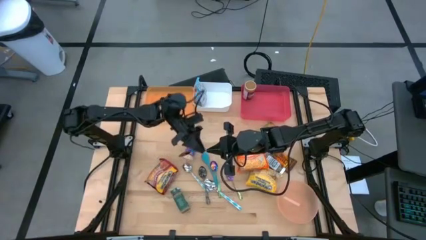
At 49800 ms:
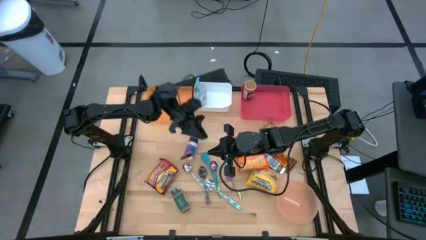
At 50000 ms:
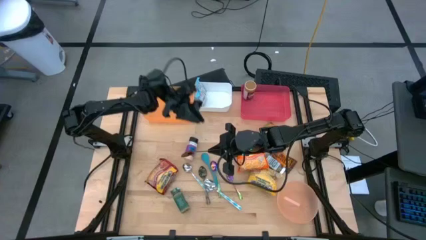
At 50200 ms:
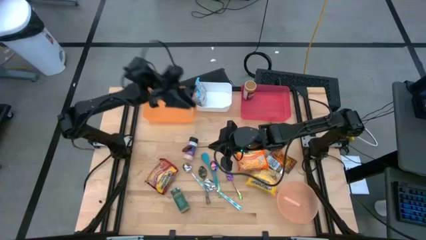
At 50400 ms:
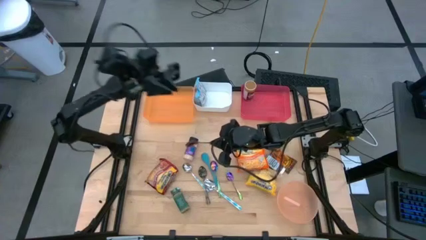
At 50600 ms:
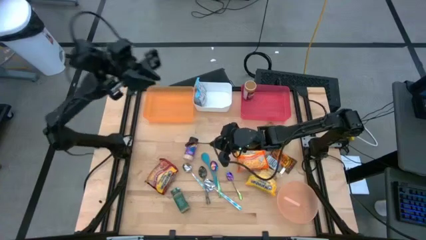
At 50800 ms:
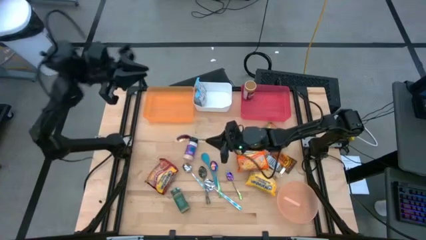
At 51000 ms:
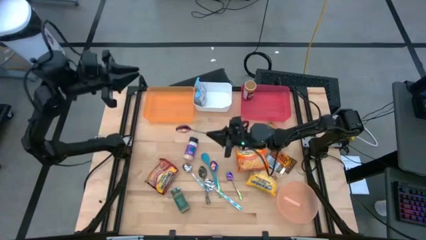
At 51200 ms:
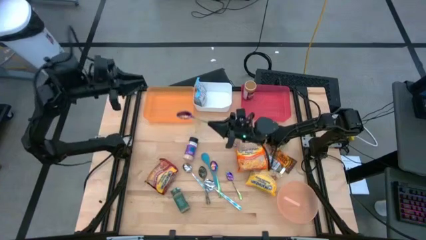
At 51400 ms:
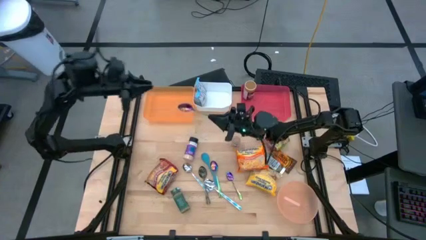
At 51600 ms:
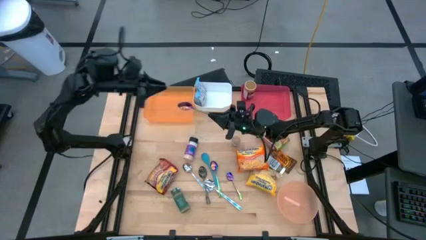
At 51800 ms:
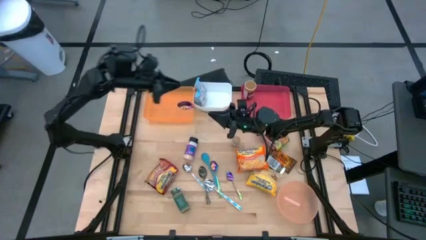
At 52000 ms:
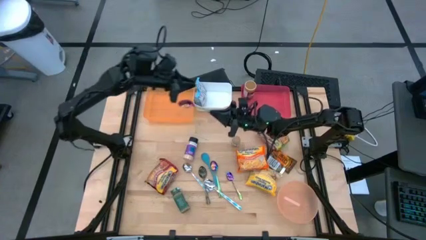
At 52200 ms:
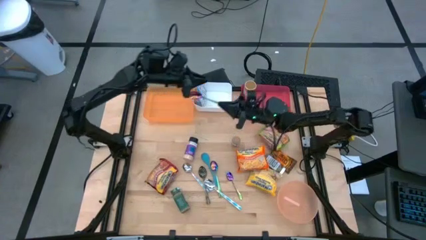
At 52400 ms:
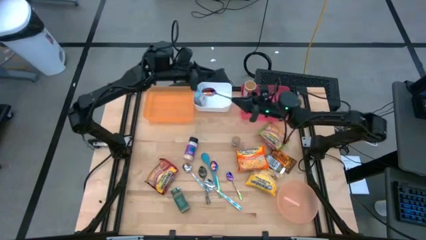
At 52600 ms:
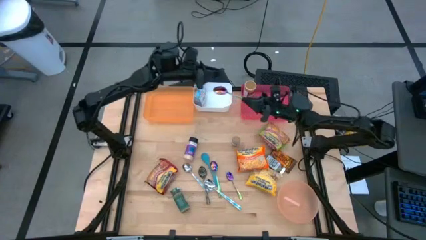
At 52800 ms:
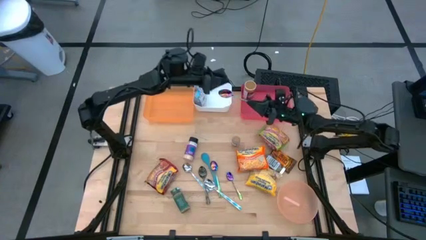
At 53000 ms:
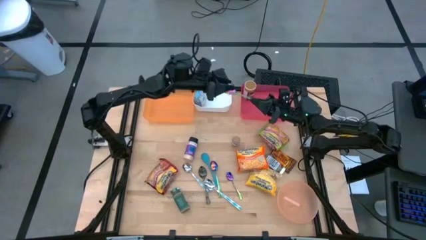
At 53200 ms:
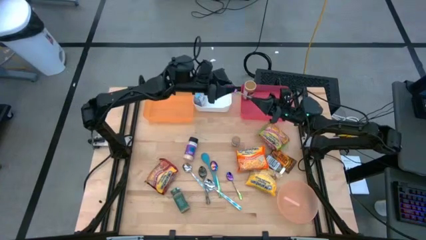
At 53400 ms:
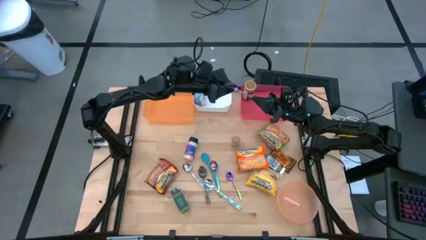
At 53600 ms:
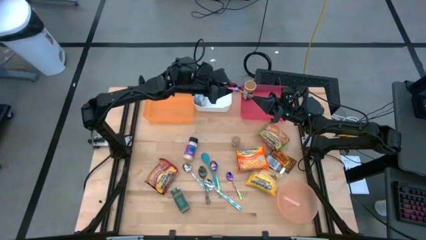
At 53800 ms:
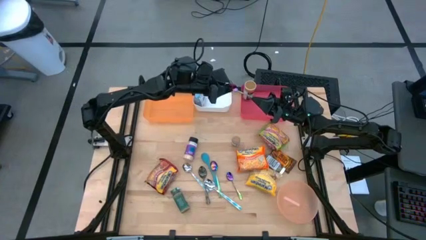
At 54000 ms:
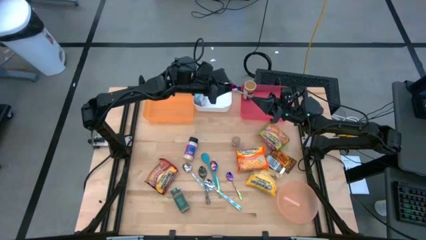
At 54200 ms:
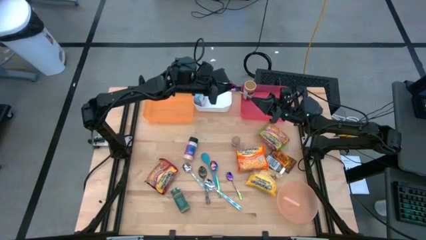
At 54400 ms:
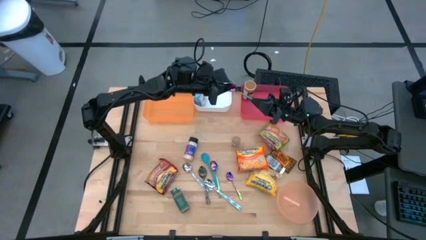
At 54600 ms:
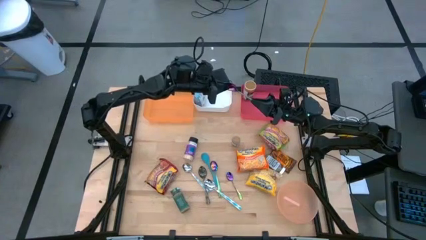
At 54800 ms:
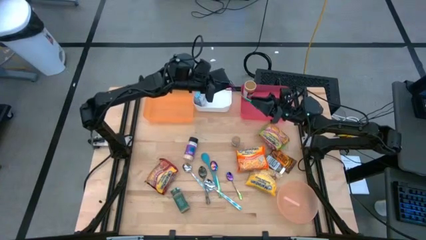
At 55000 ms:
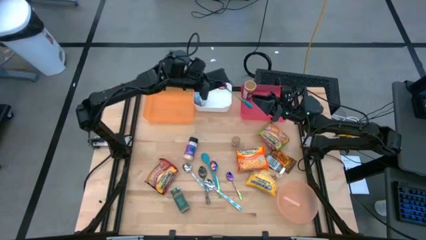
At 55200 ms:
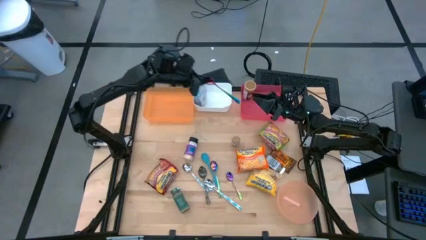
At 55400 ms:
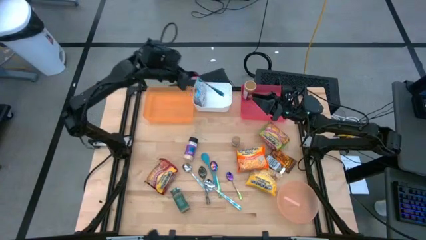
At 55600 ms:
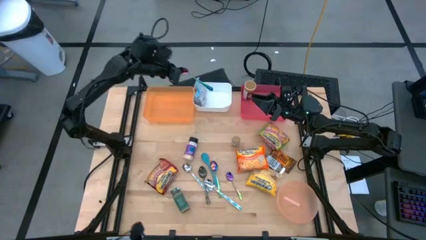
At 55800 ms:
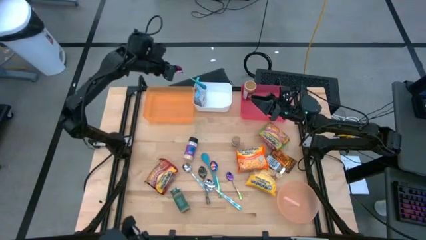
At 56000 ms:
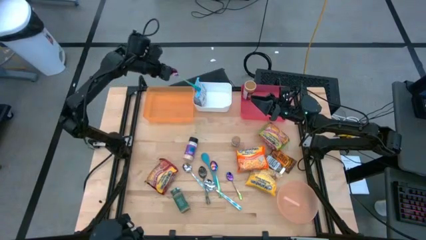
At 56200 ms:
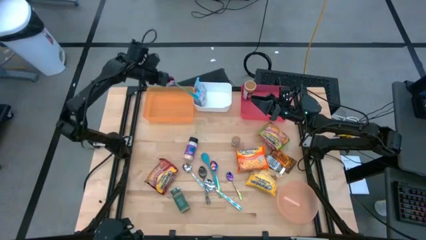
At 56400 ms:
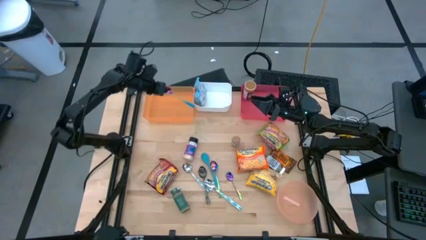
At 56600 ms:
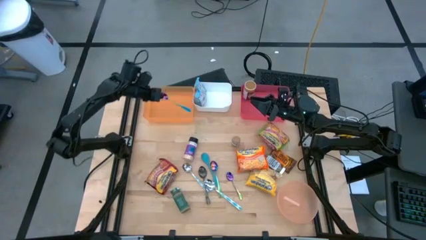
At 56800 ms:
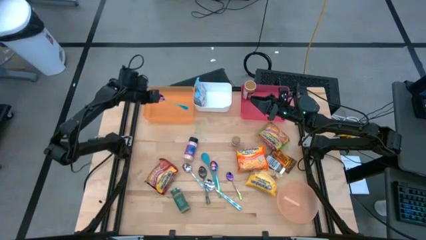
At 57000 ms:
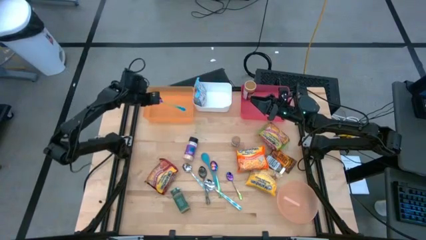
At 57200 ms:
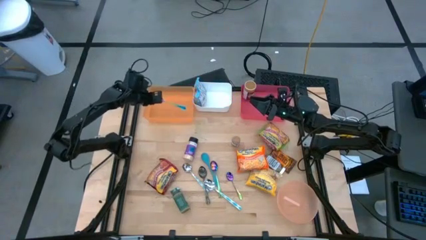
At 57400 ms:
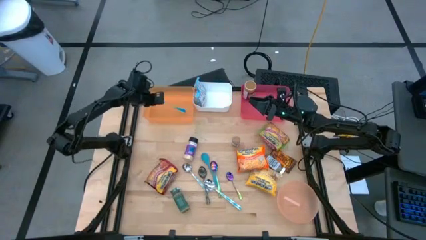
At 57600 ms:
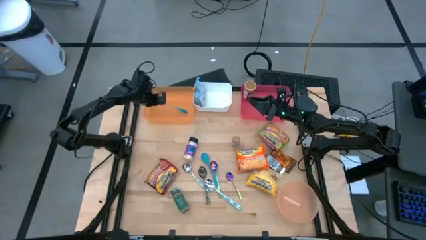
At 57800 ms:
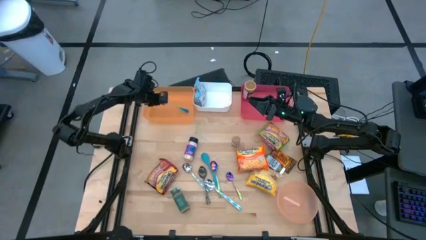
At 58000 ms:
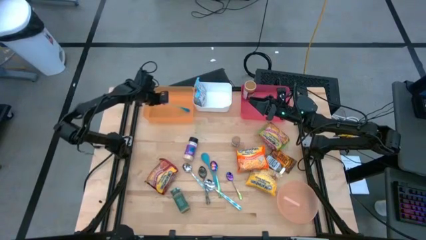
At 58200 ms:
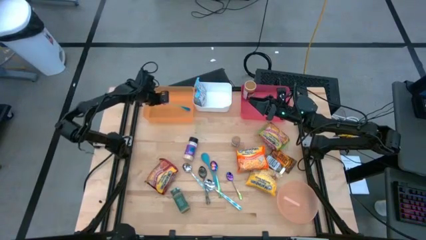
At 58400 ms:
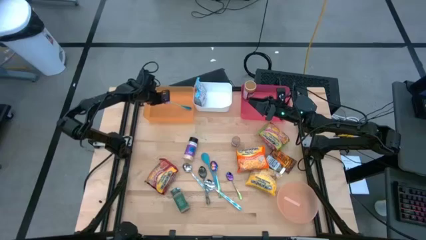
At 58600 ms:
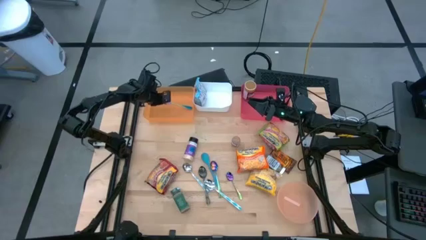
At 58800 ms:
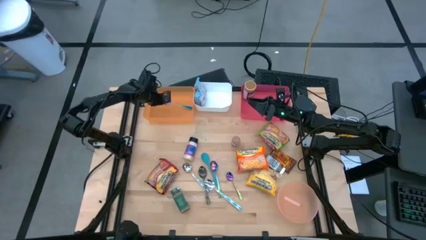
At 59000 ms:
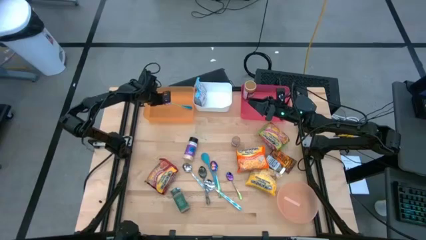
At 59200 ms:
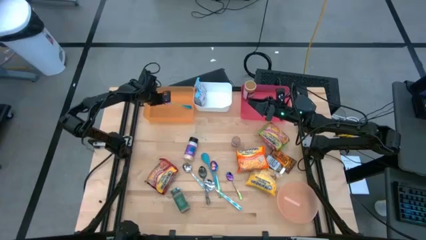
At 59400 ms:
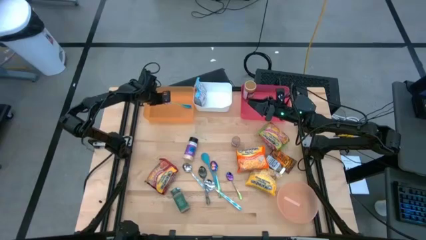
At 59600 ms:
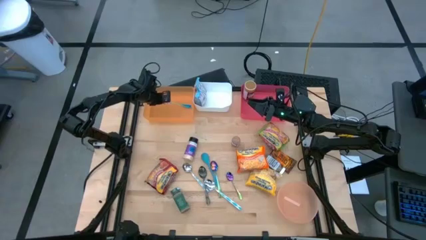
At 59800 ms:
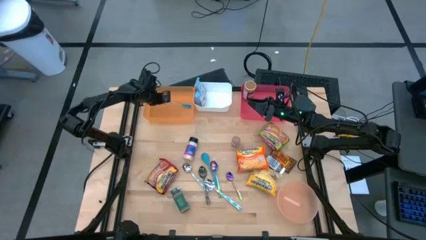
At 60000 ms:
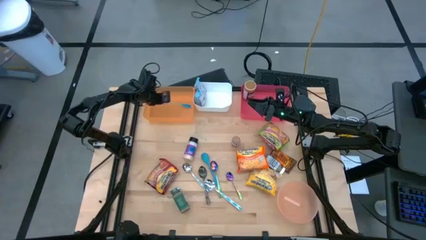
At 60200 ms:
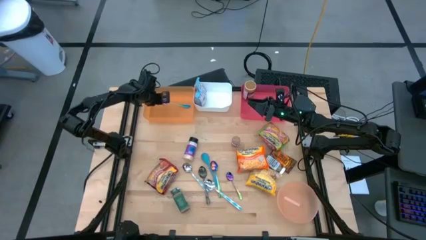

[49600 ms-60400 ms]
Task: Pick & Place Food Item
Put the bottom left violet and green spoon into the orange bin
